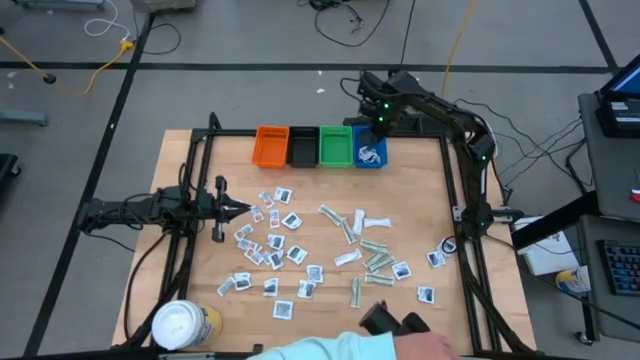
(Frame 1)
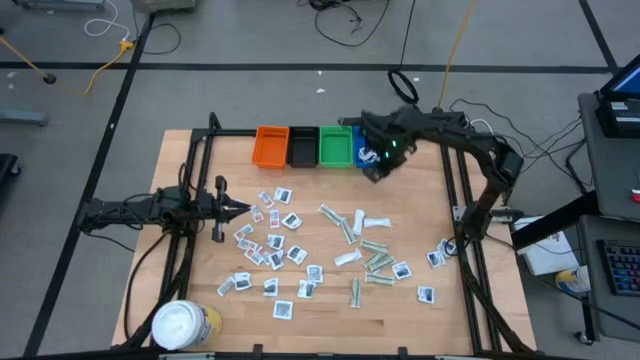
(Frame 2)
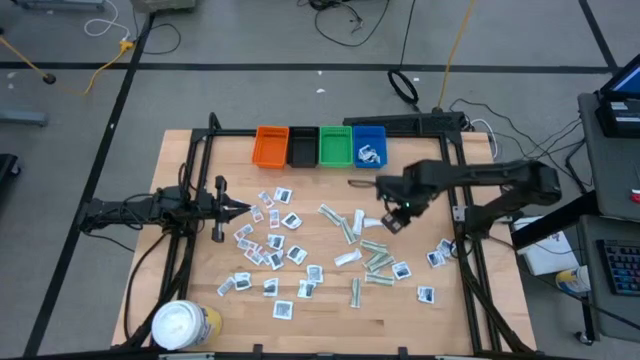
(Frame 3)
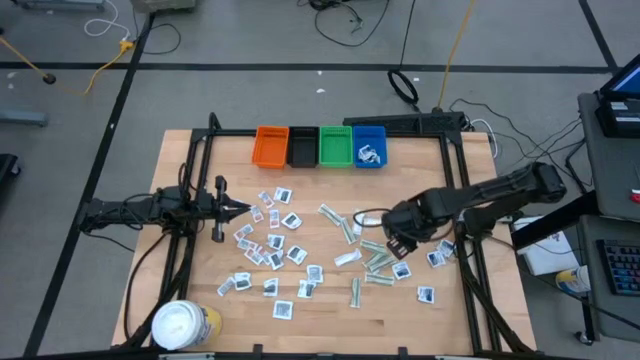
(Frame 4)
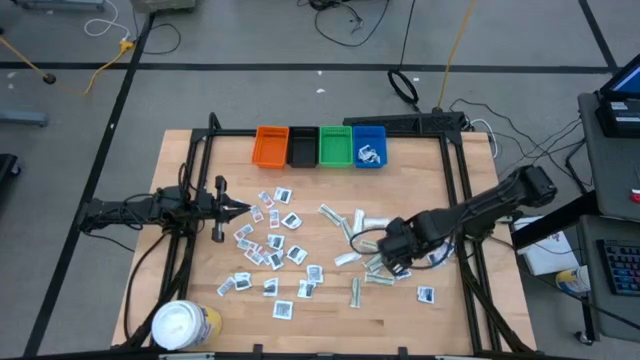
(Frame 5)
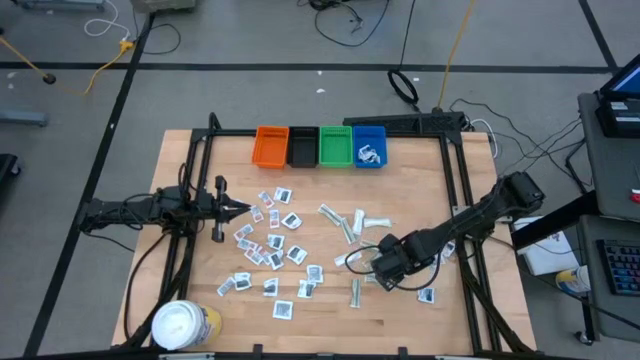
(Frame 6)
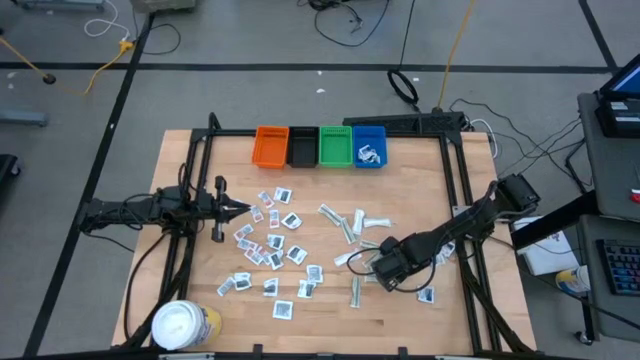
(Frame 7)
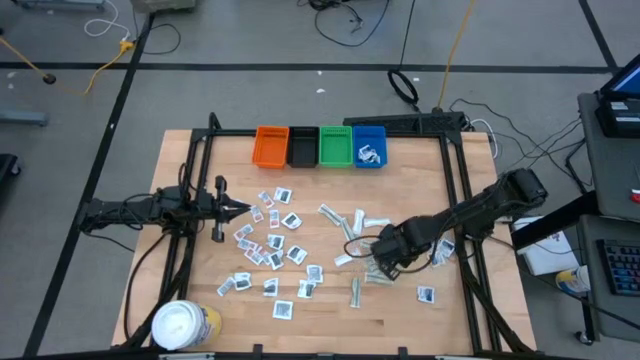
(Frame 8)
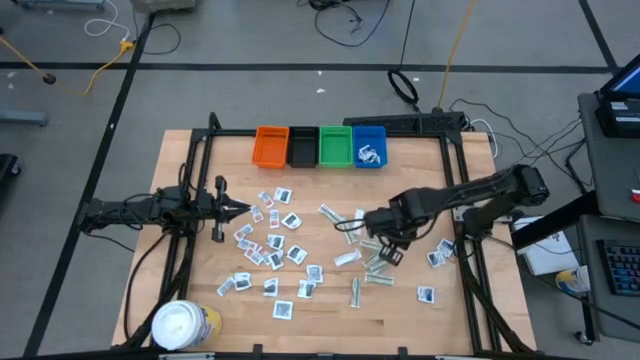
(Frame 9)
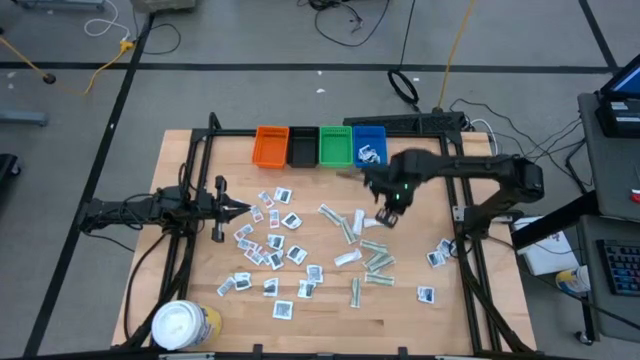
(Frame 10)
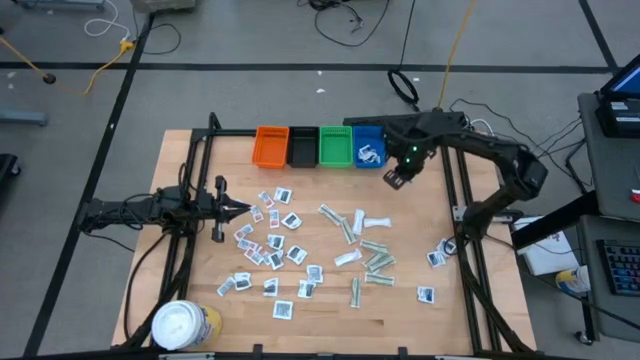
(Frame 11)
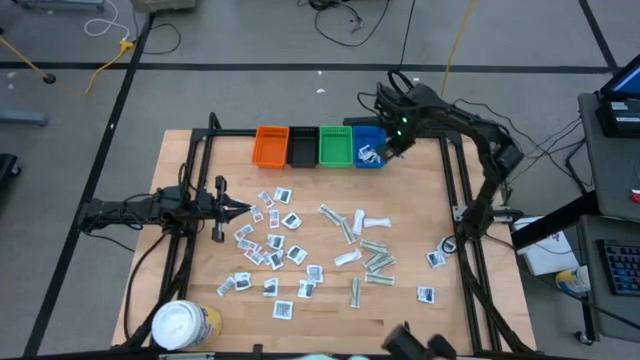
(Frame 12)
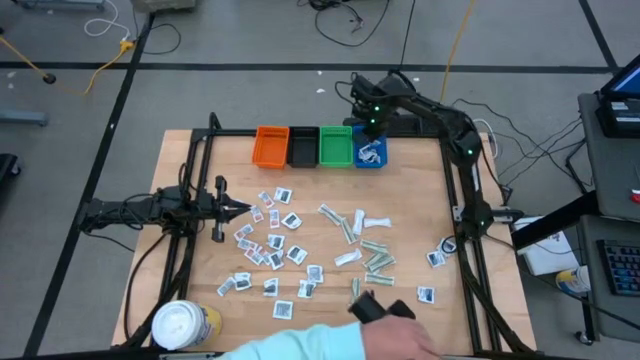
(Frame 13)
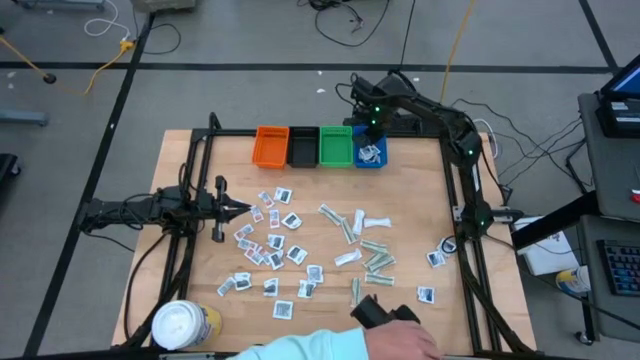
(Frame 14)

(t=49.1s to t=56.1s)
Task: Pick & Place First Aid Supplies
Put the blue packet into the blue bin

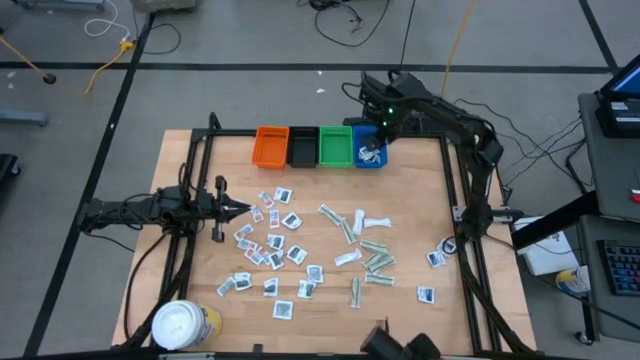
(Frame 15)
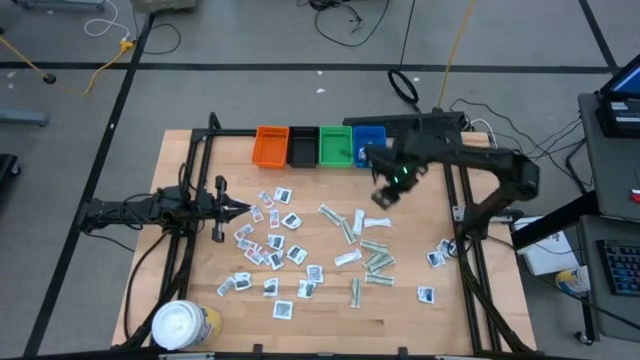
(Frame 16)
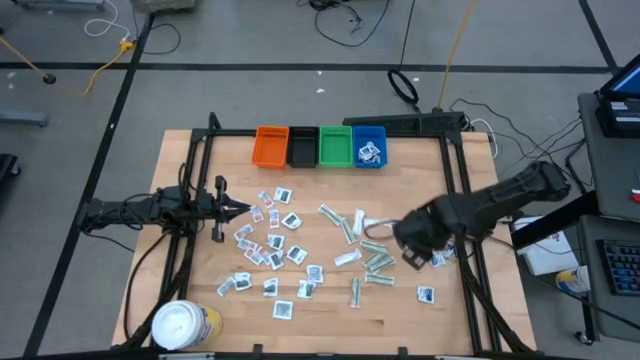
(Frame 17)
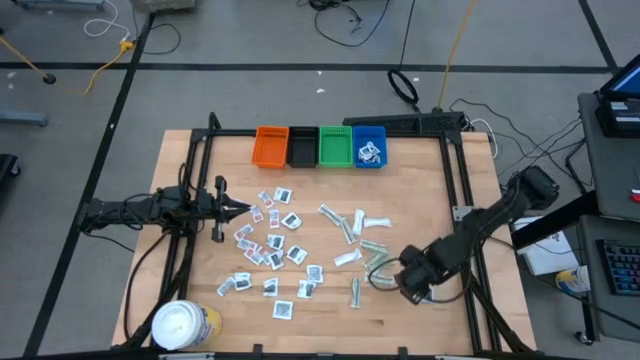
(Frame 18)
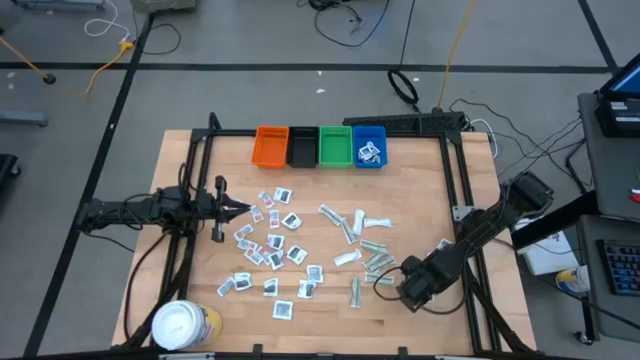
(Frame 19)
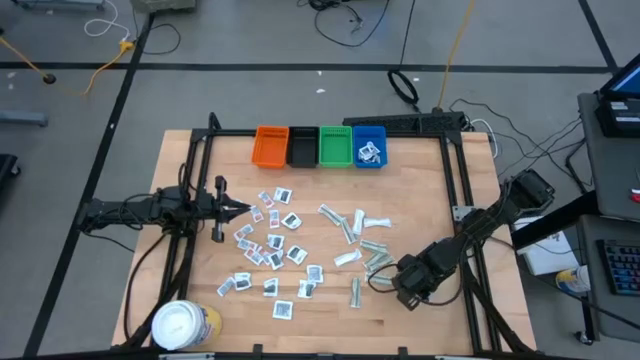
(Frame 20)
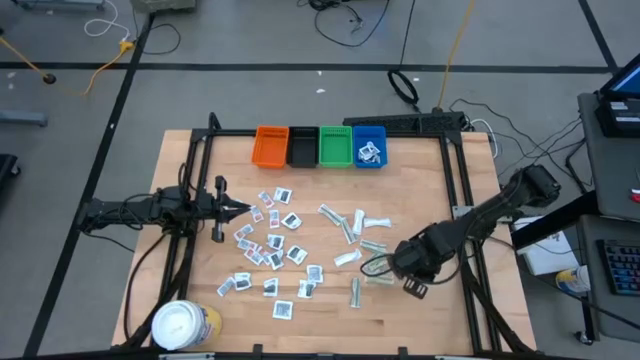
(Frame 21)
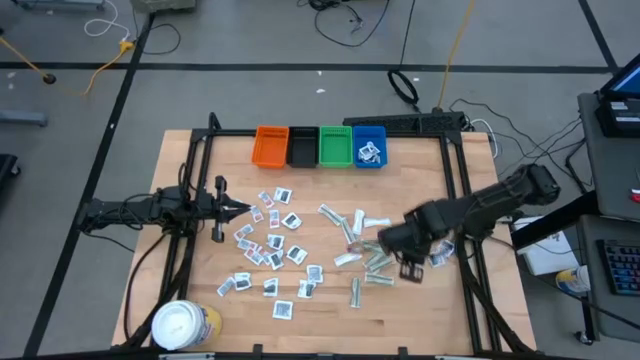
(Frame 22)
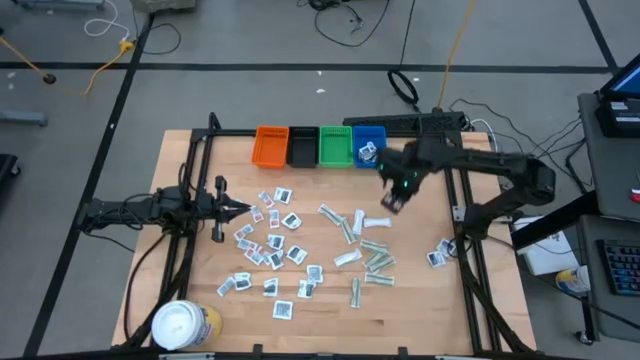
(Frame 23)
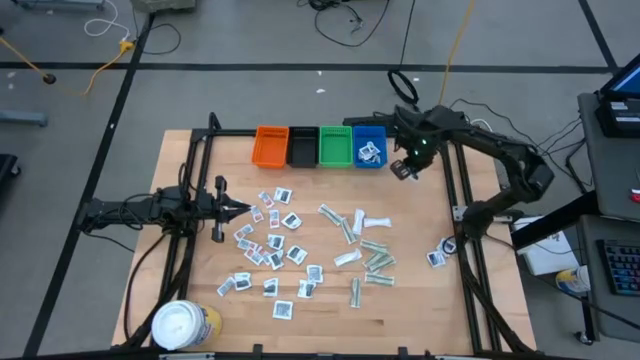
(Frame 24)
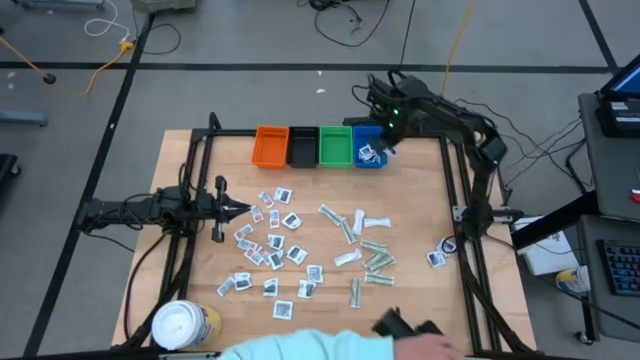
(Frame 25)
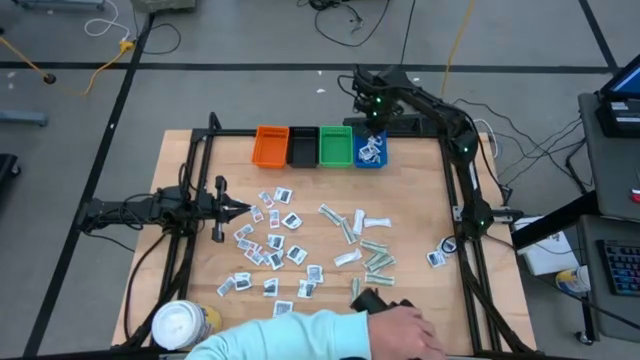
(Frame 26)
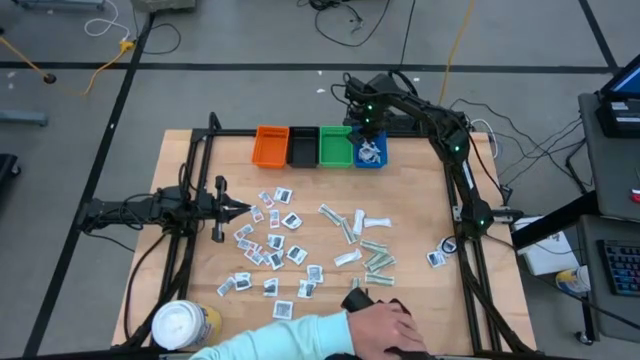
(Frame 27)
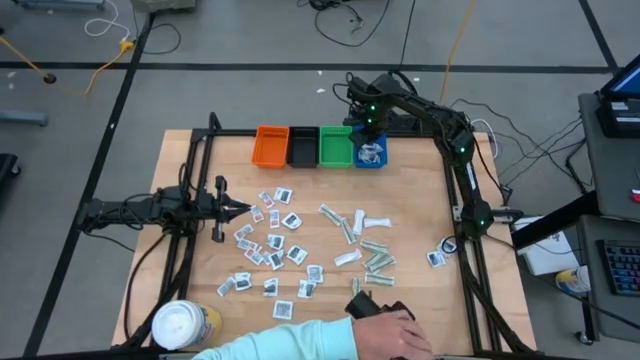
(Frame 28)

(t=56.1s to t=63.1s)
Put the blue packet into the blue bin

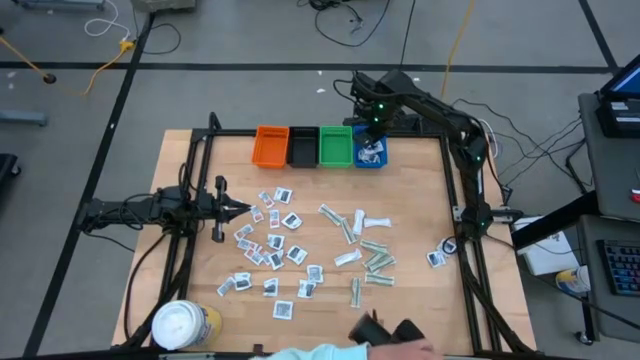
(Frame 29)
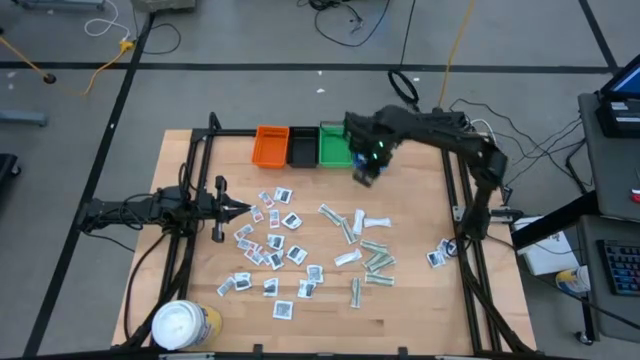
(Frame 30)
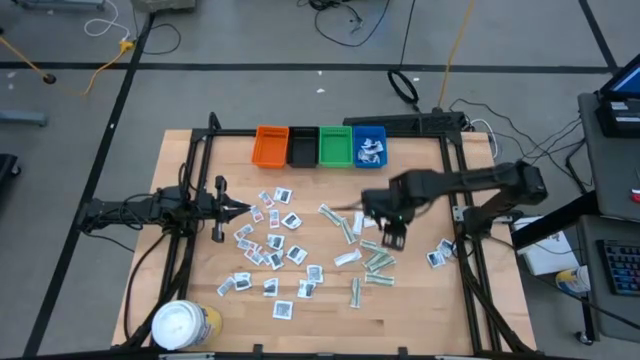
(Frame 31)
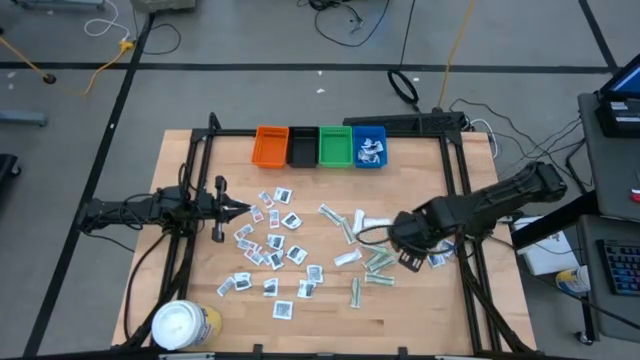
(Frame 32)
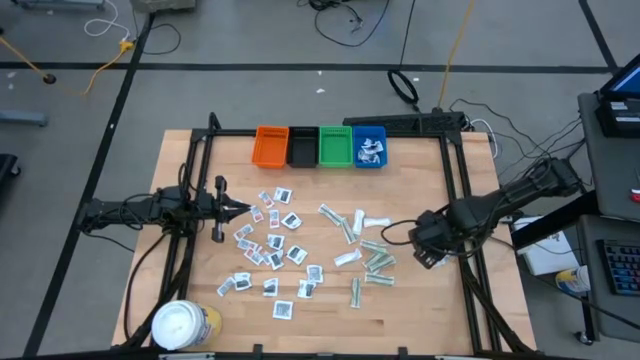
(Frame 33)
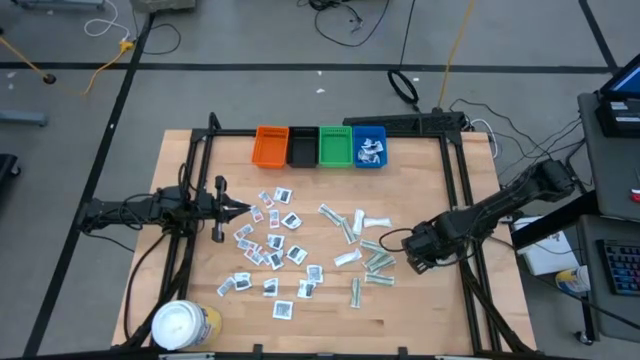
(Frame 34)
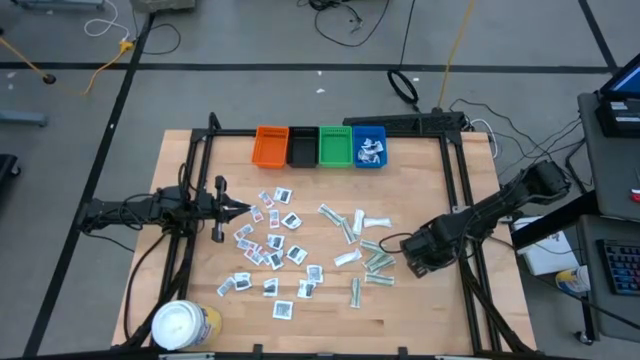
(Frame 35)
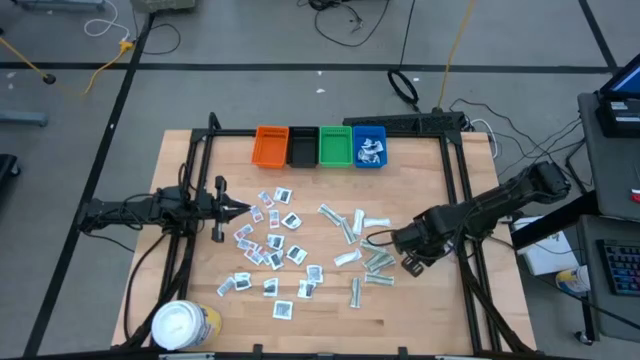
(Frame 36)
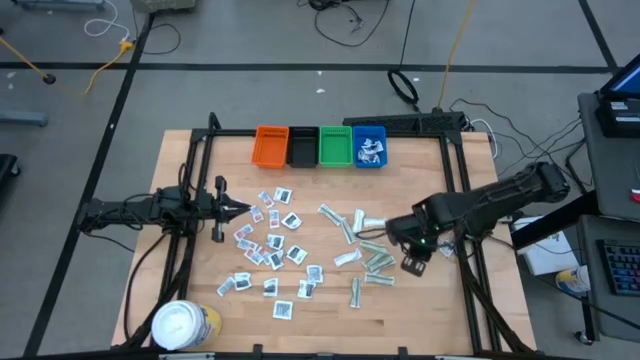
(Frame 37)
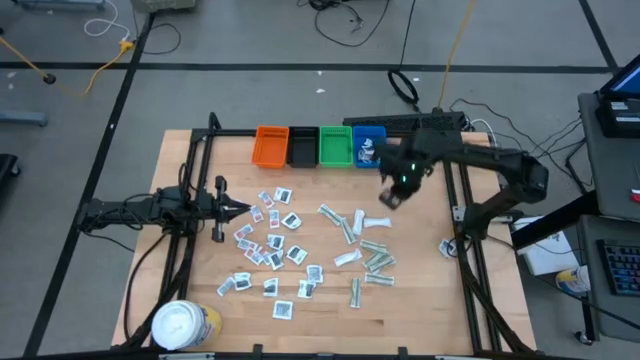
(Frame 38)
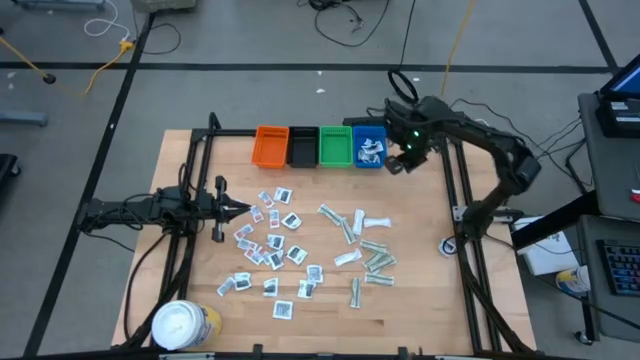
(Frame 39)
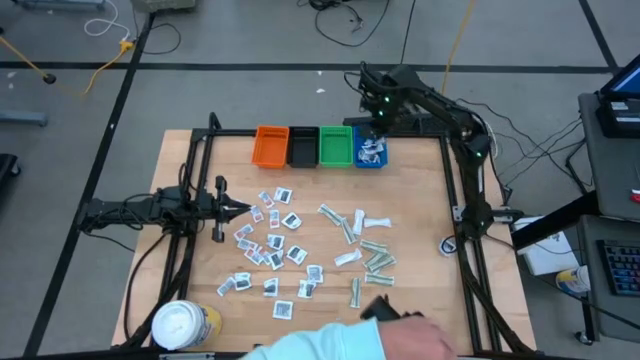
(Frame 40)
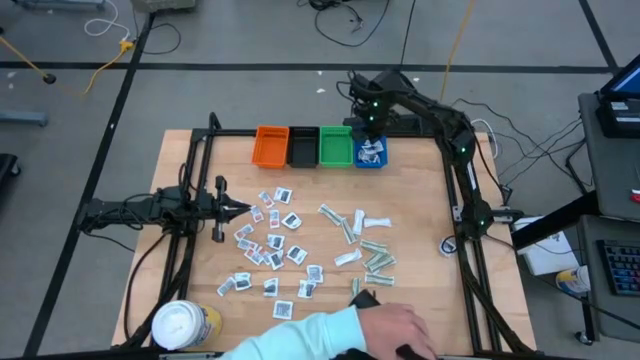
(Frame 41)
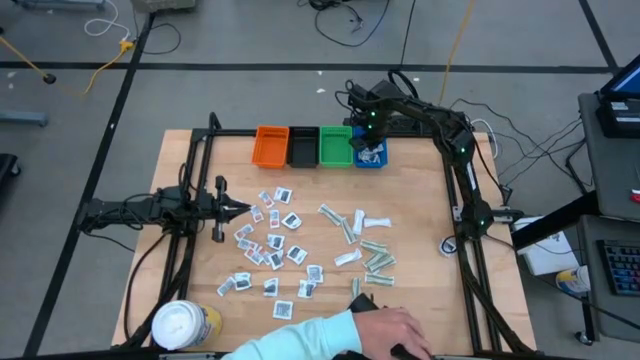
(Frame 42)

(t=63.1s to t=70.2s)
Put the blue packet into the blue bin
